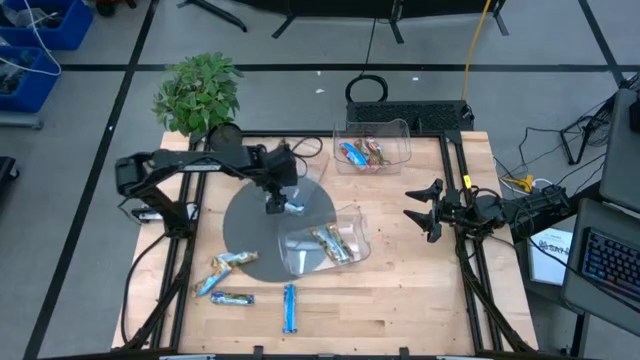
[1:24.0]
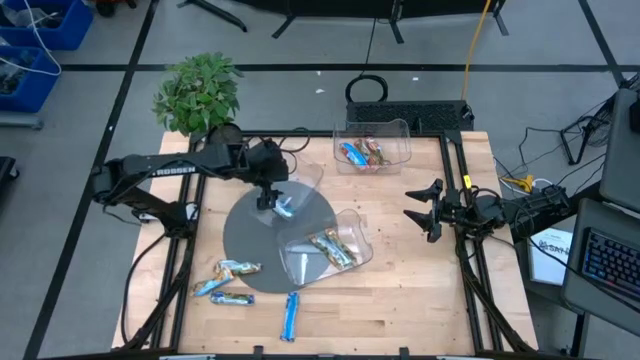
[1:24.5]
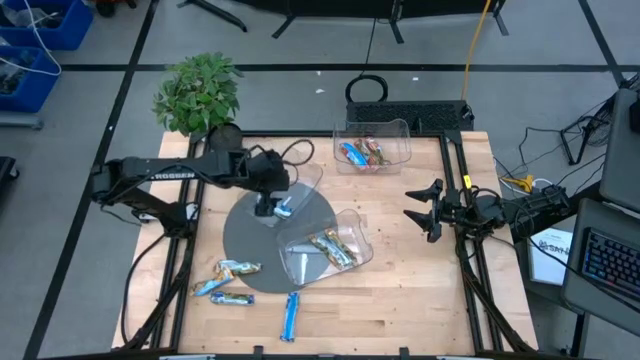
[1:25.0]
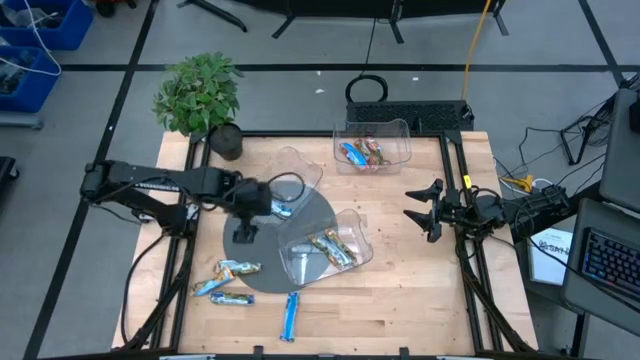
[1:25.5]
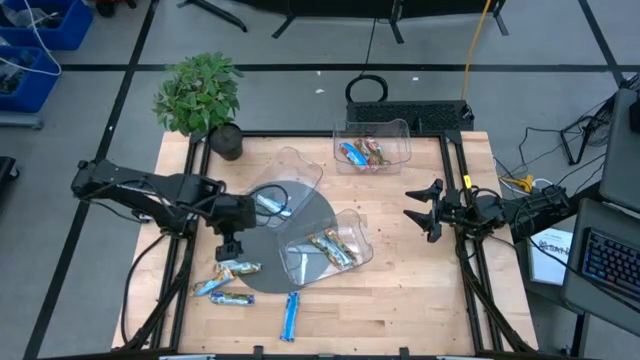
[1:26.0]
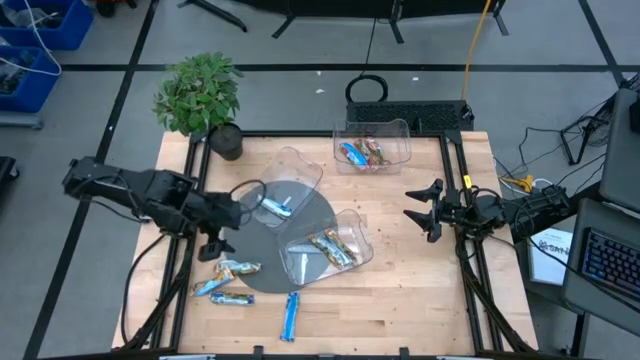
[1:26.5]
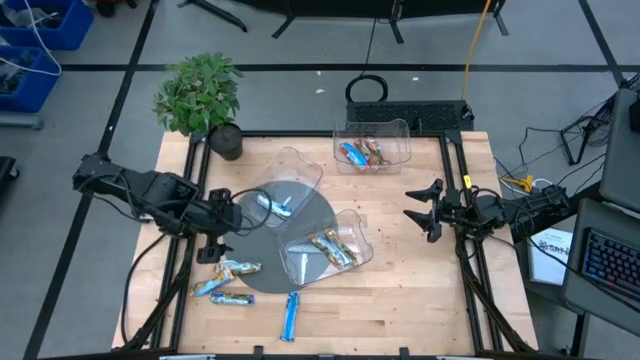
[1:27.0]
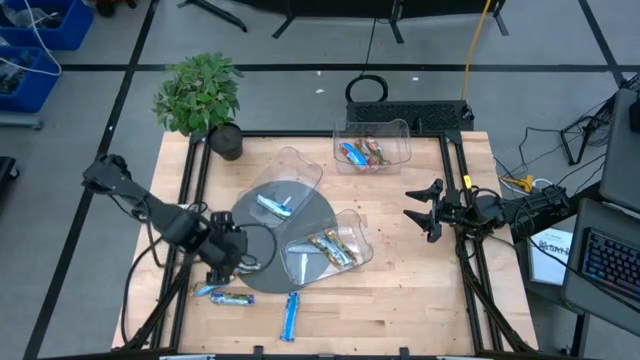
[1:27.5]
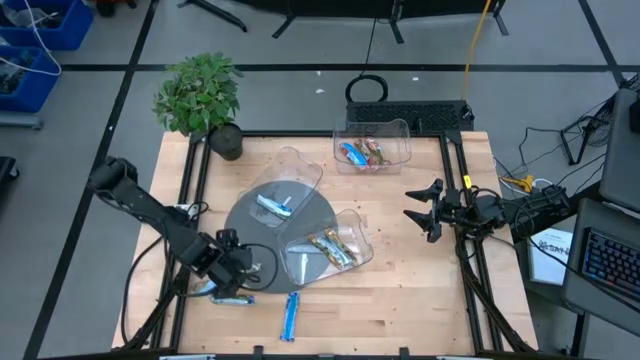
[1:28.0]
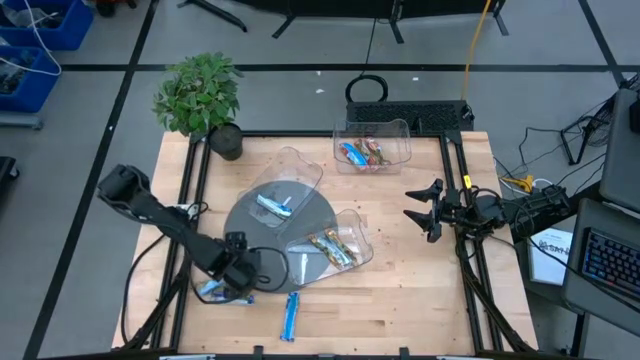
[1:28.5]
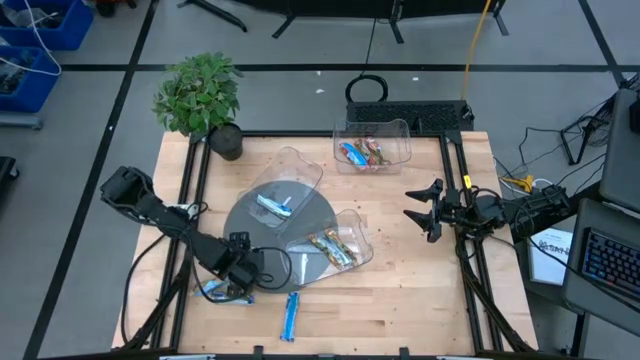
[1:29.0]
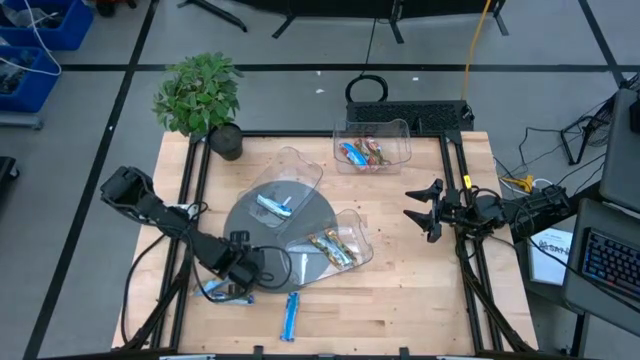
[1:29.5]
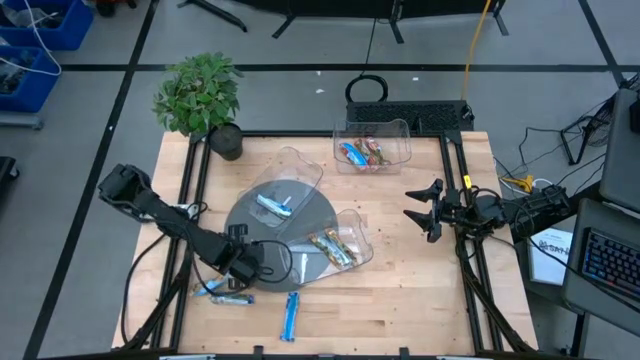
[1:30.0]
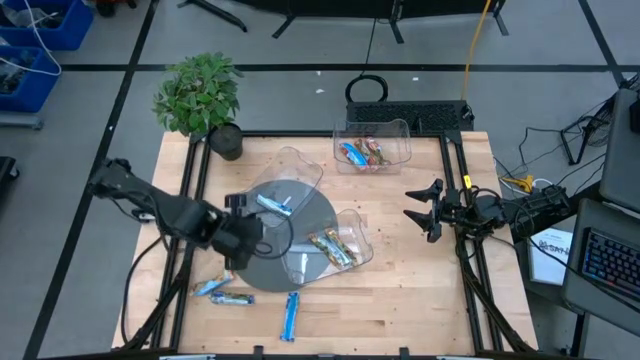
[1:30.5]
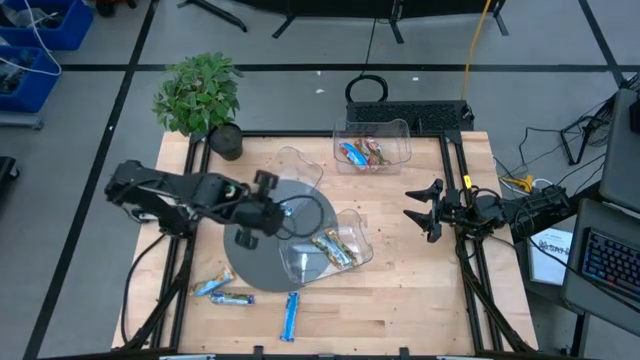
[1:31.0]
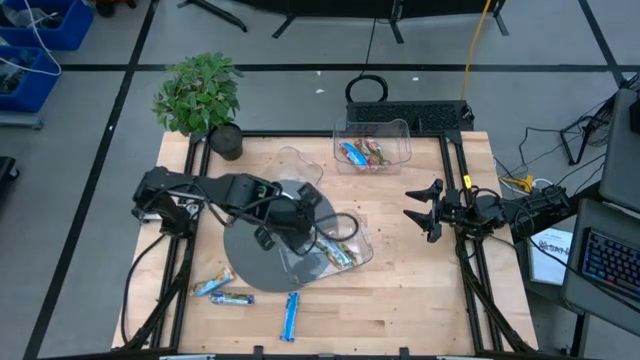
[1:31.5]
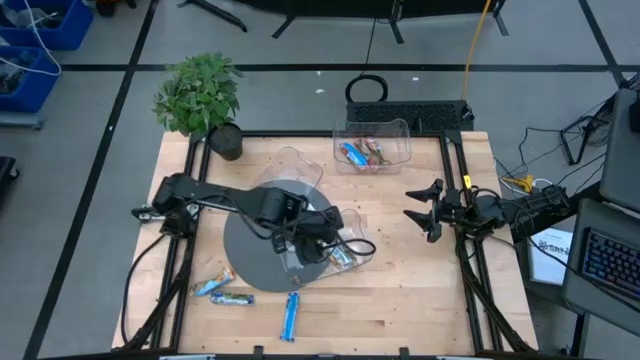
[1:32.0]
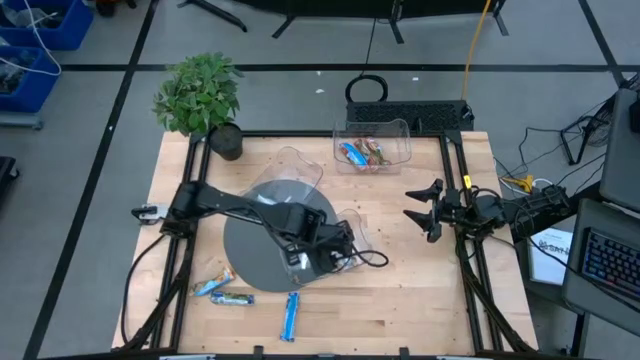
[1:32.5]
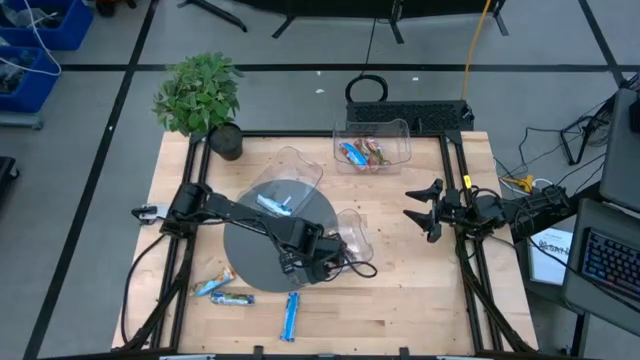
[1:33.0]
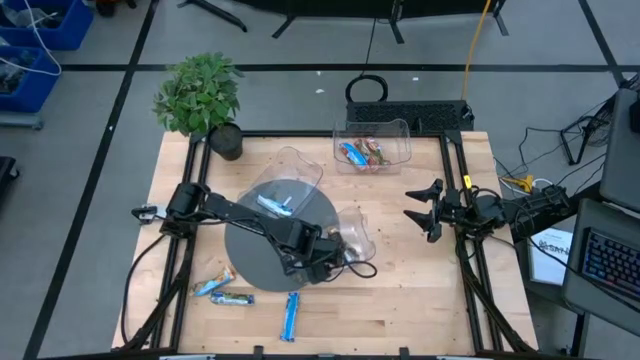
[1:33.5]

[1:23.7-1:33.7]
Task: Pick and place Granola Bars by type
Put the yellow granola bar into the bottom transparent bin

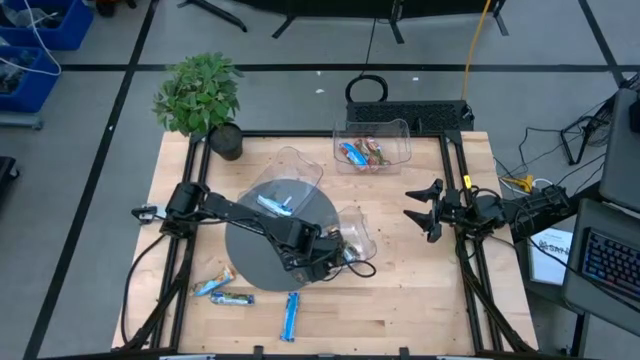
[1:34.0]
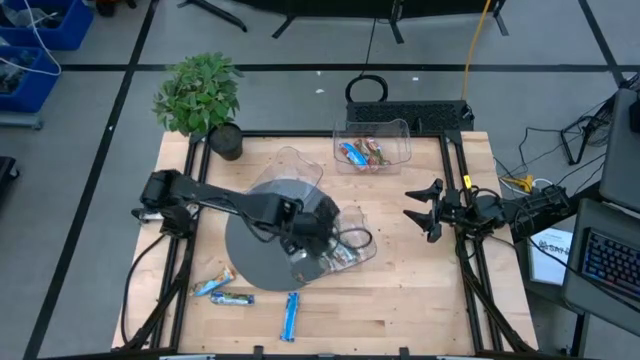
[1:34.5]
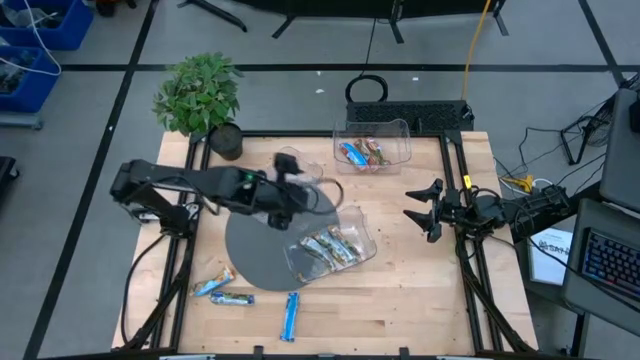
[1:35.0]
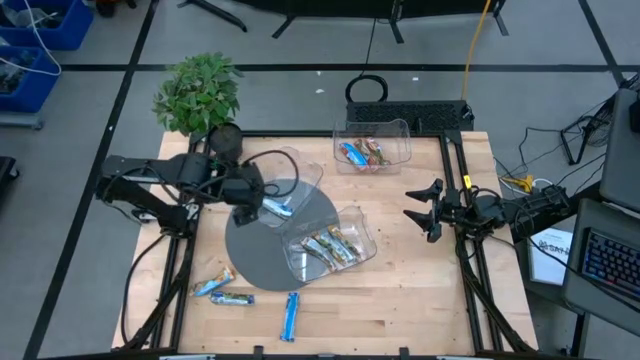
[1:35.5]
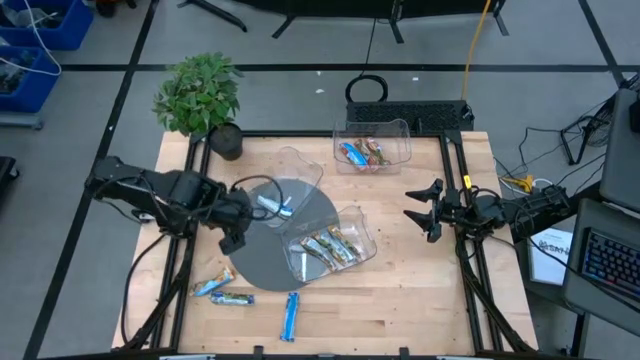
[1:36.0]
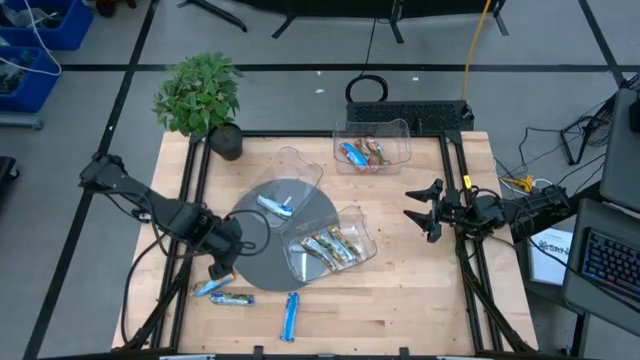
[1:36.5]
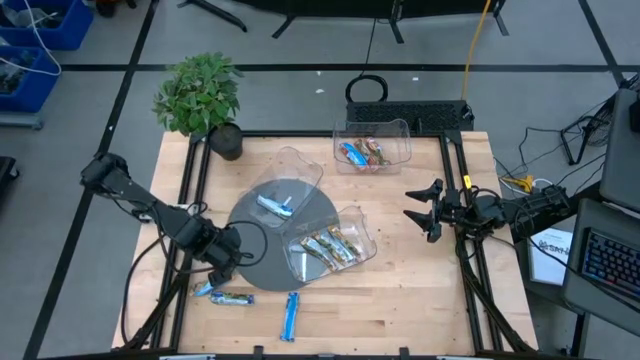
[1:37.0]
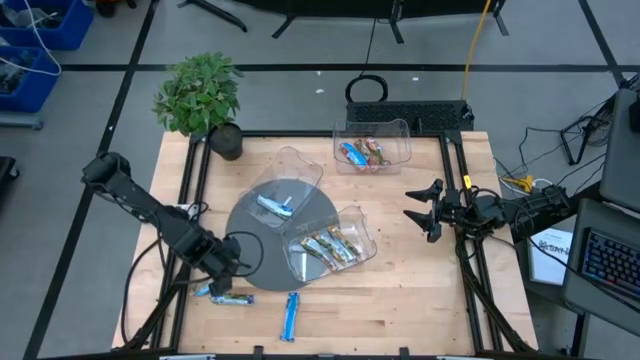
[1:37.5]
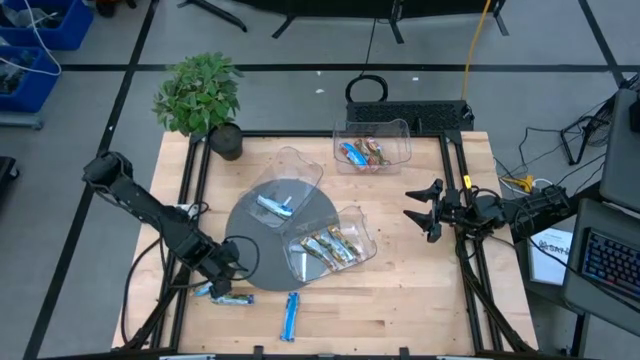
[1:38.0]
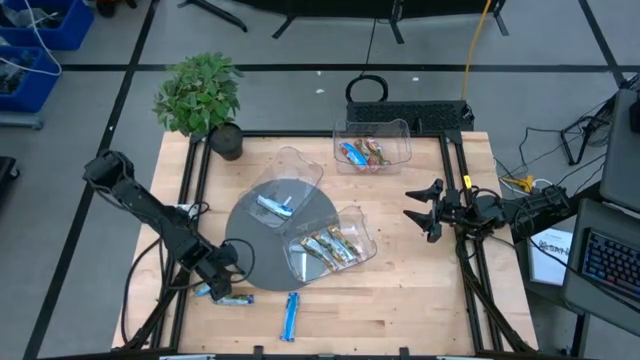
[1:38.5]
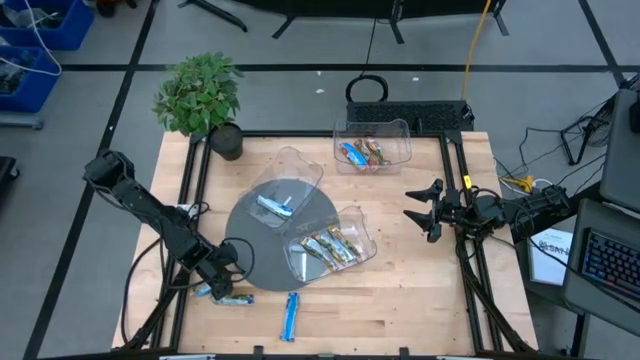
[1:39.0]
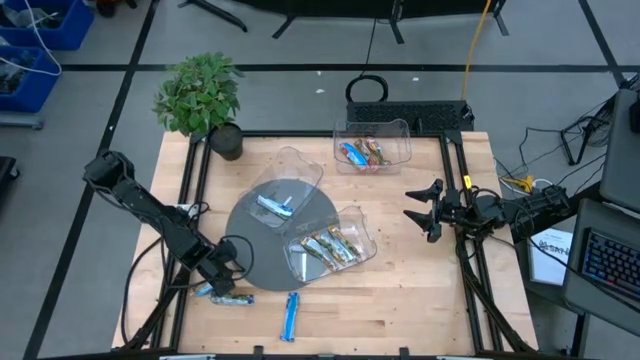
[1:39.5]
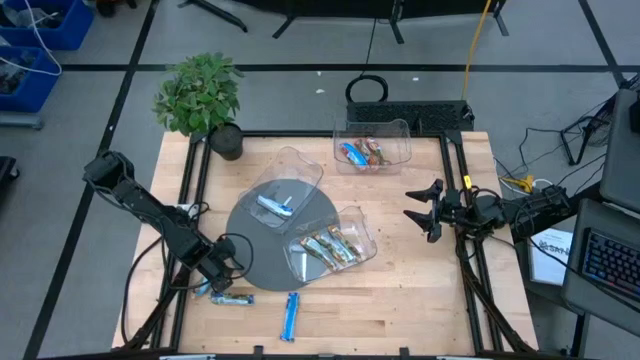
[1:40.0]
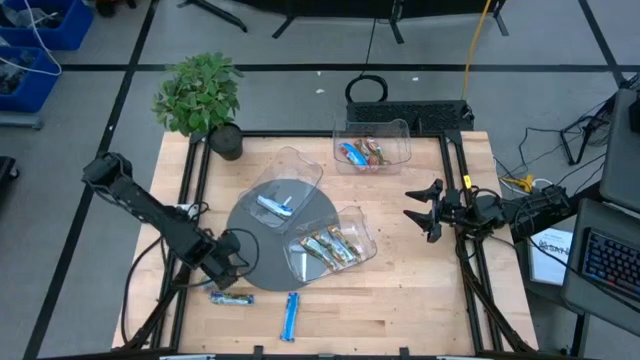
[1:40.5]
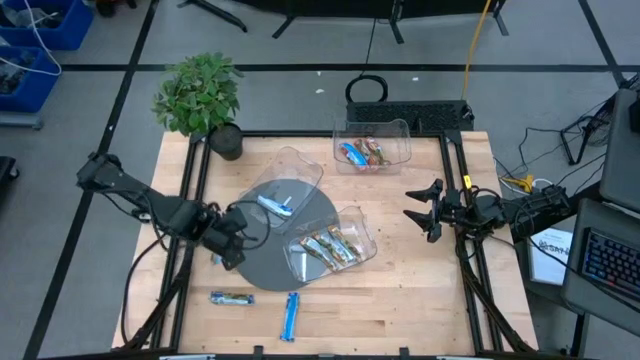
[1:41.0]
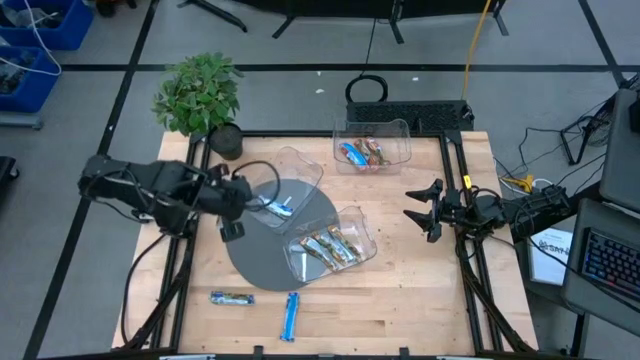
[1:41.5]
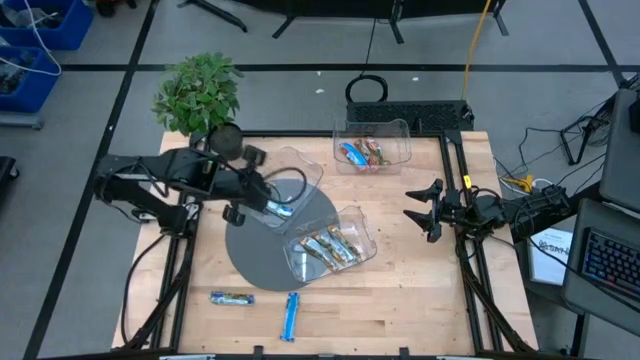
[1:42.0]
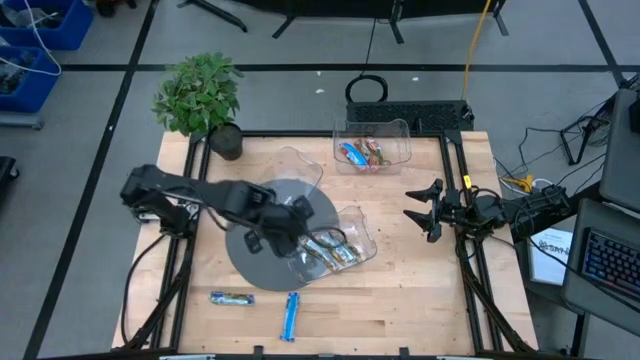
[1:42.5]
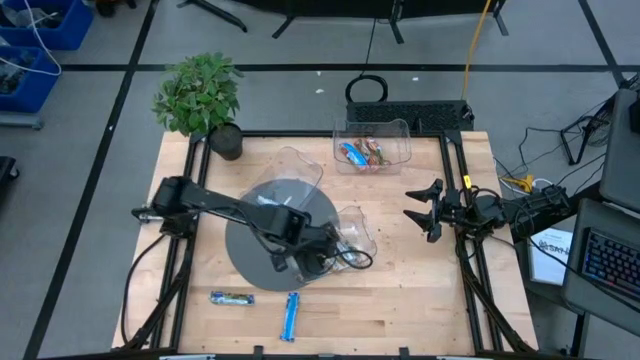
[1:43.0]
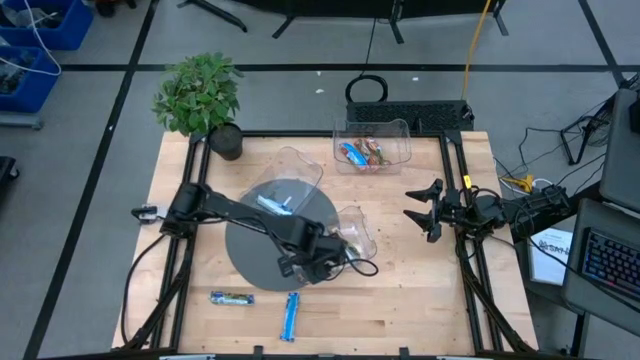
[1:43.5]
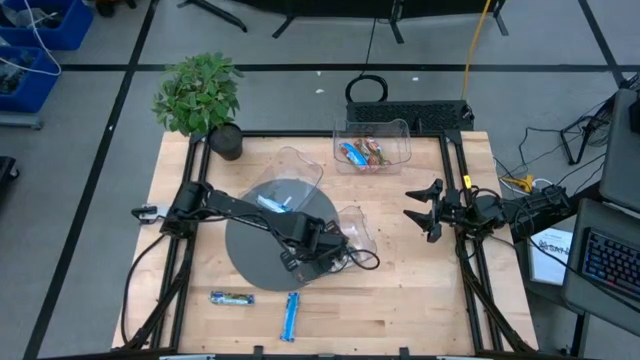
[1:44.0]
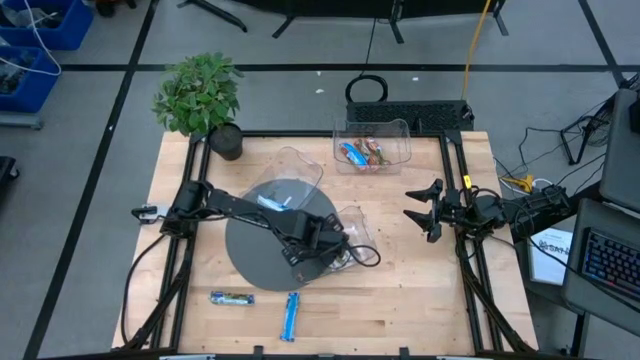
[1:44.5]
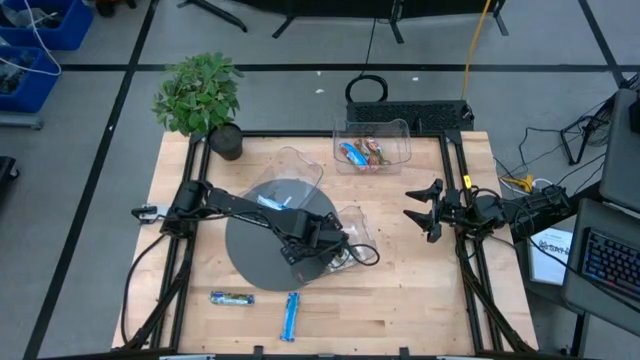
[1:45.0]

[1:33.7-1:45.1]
Put the yellow granola bar into the bottom transparent bin
